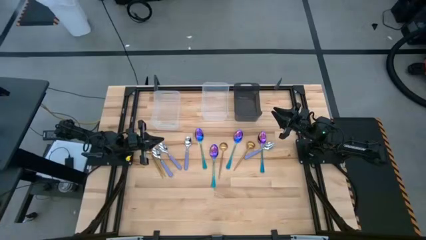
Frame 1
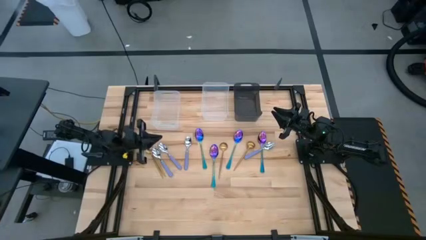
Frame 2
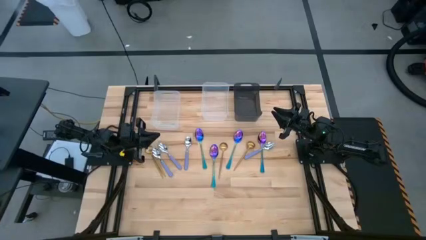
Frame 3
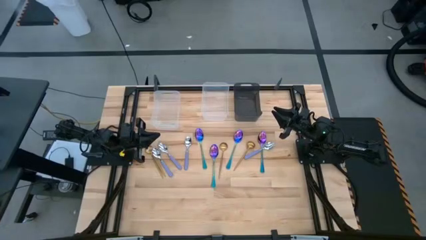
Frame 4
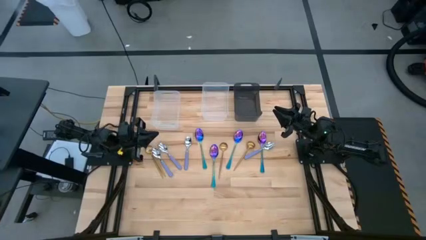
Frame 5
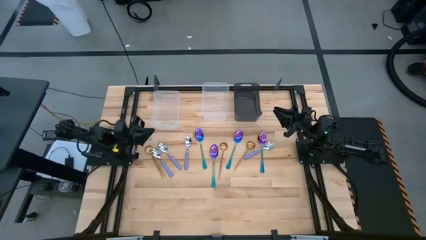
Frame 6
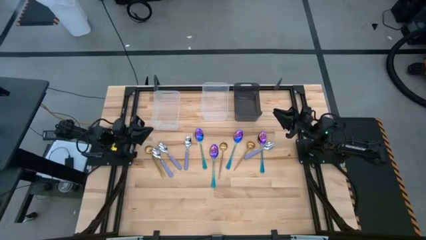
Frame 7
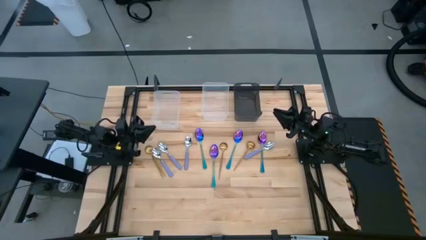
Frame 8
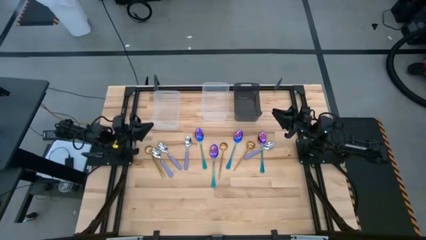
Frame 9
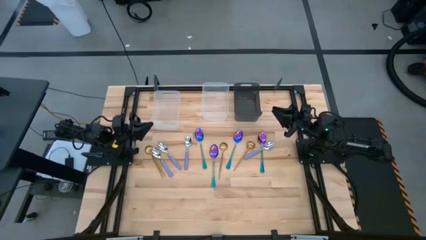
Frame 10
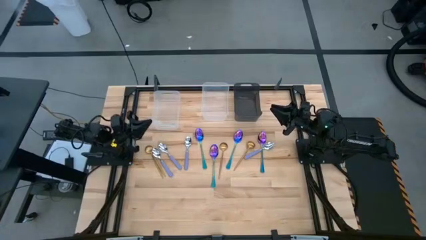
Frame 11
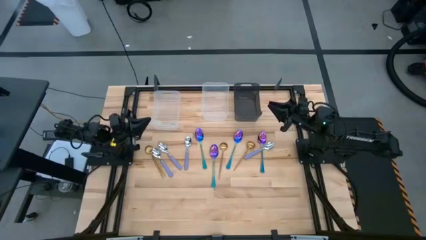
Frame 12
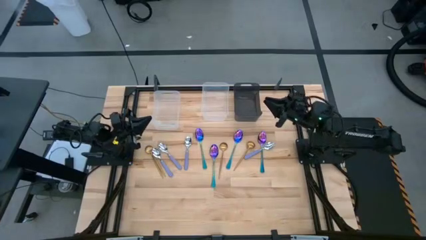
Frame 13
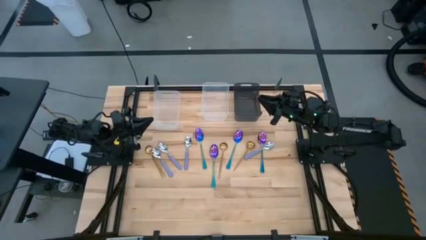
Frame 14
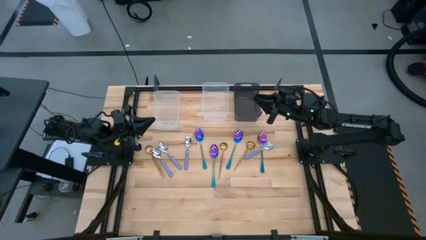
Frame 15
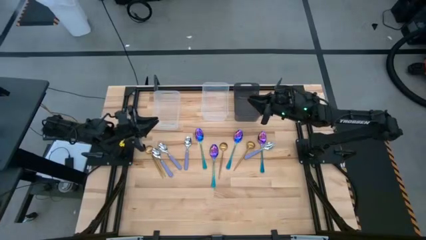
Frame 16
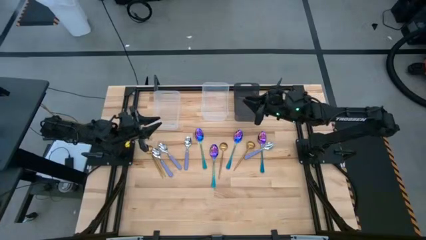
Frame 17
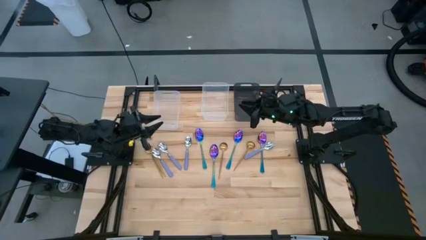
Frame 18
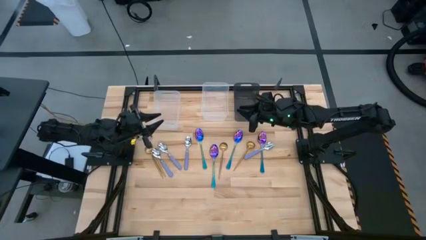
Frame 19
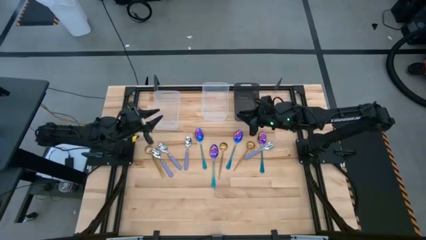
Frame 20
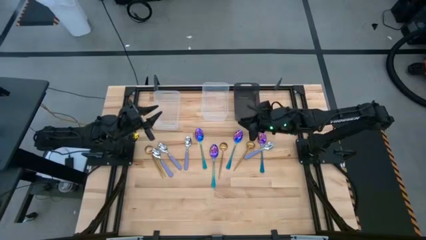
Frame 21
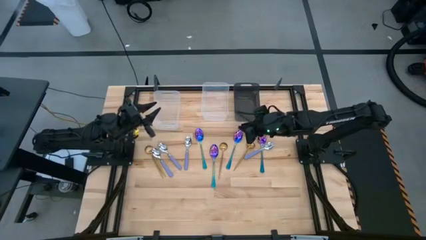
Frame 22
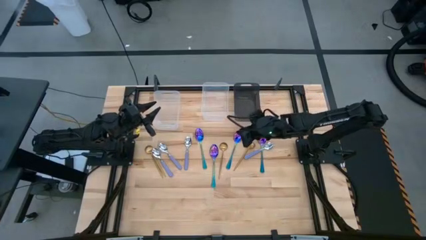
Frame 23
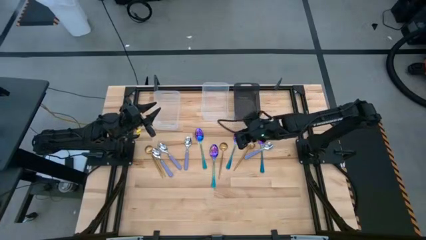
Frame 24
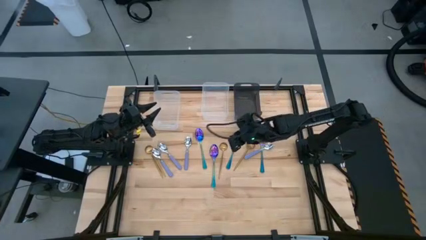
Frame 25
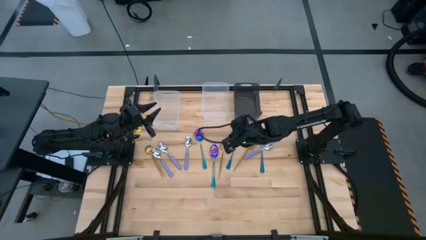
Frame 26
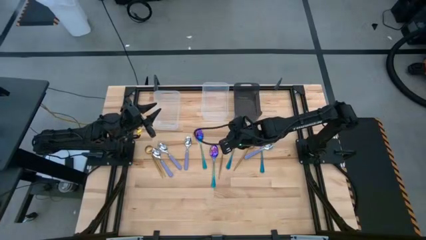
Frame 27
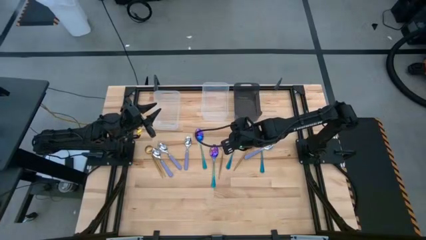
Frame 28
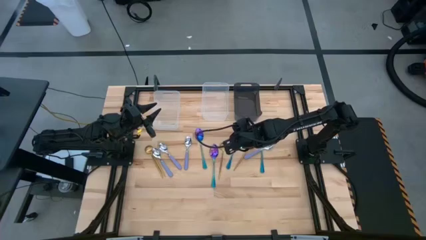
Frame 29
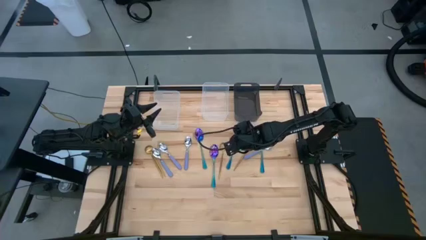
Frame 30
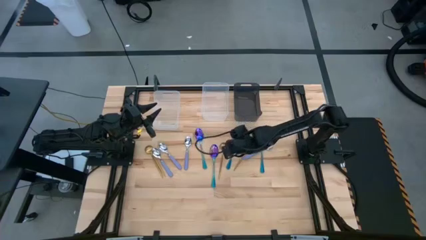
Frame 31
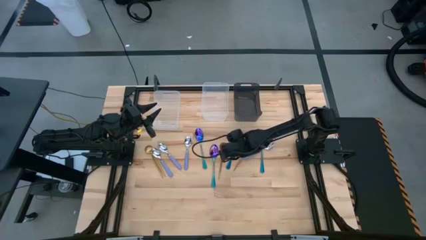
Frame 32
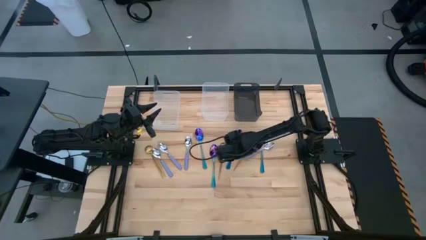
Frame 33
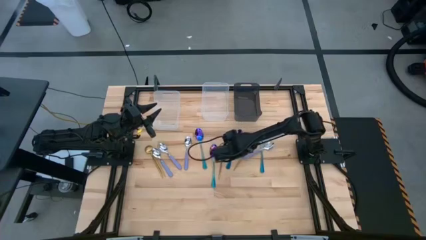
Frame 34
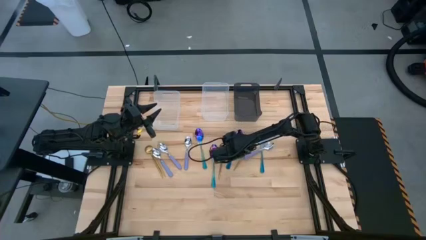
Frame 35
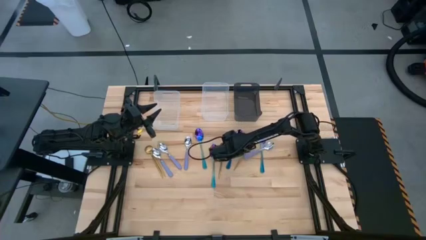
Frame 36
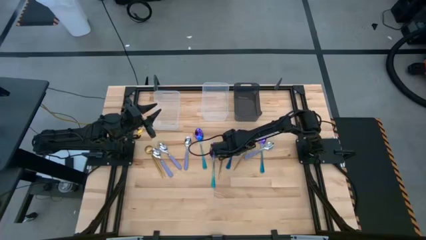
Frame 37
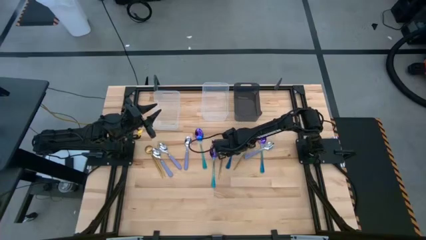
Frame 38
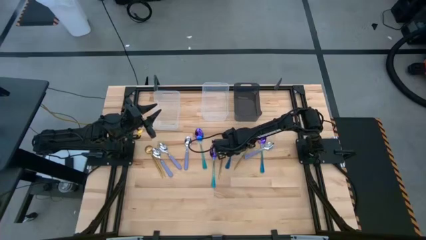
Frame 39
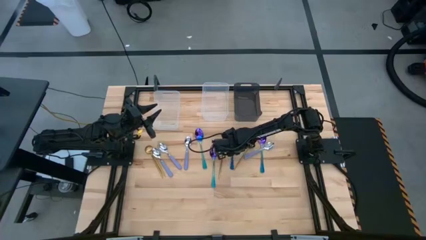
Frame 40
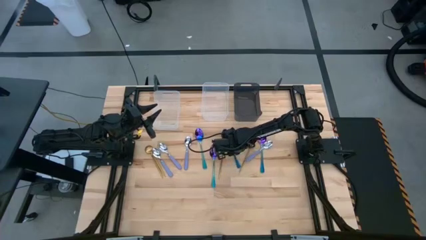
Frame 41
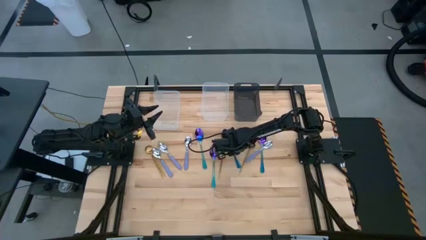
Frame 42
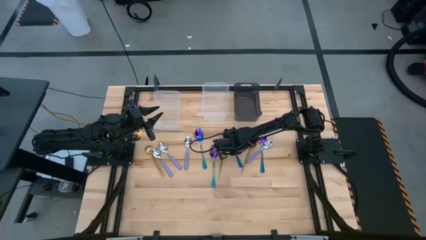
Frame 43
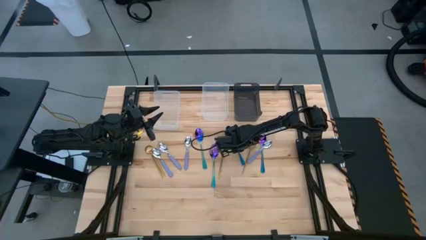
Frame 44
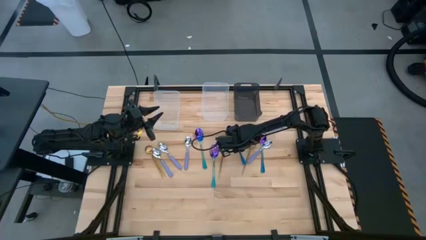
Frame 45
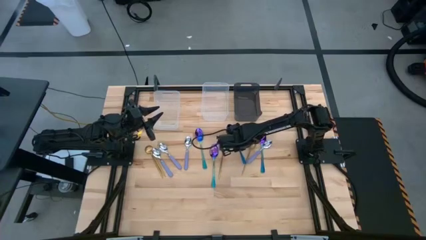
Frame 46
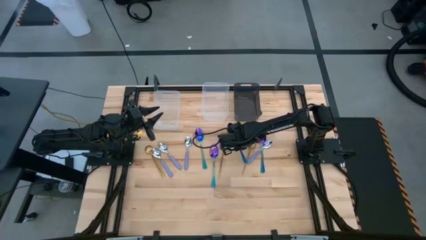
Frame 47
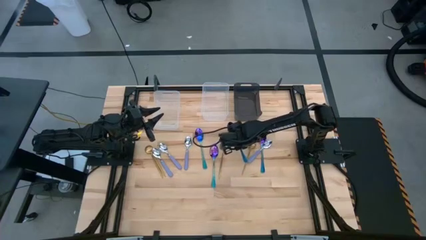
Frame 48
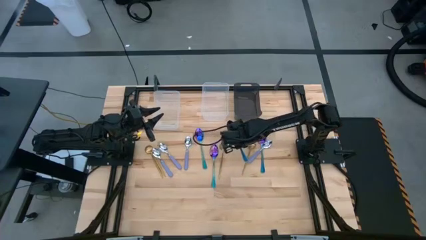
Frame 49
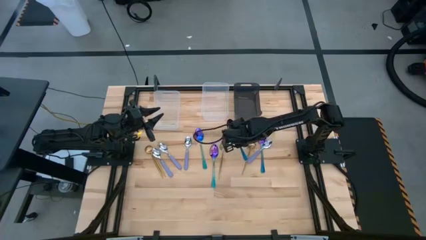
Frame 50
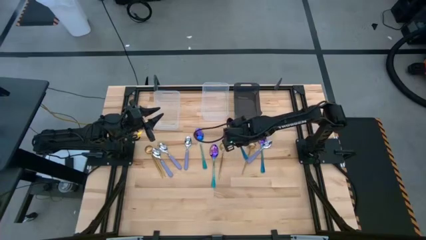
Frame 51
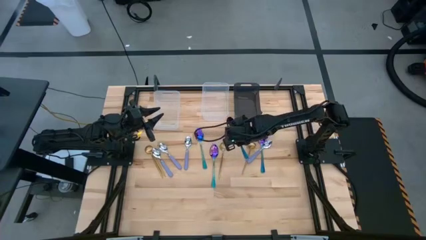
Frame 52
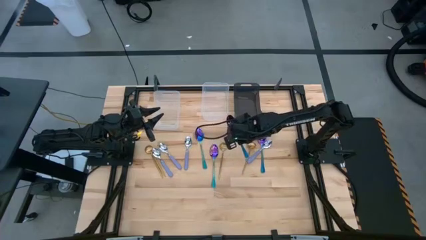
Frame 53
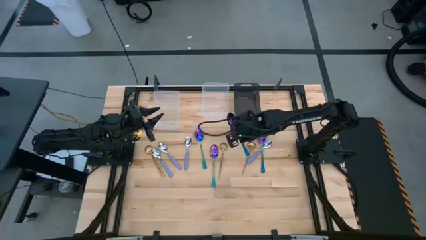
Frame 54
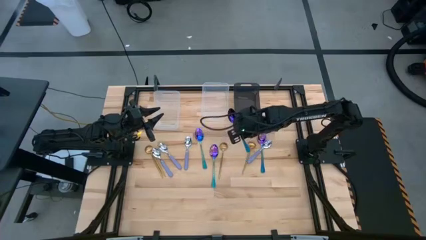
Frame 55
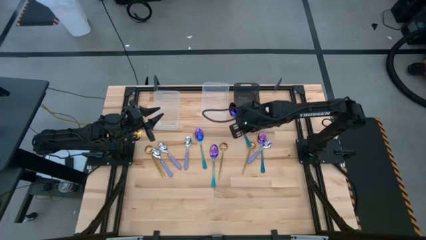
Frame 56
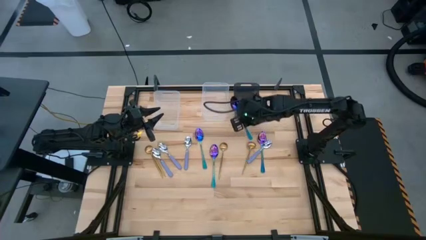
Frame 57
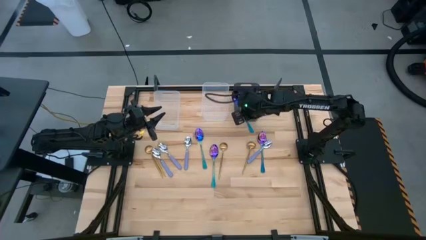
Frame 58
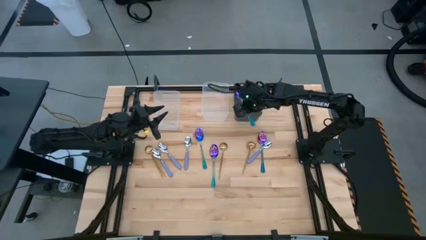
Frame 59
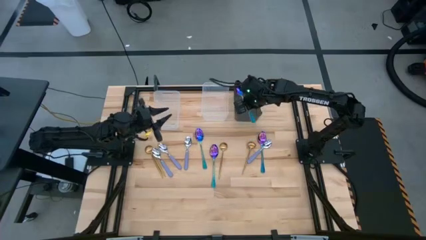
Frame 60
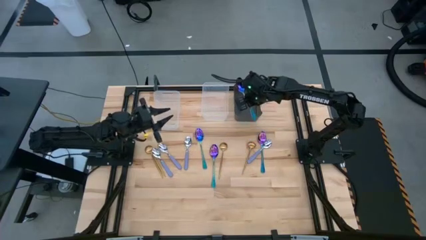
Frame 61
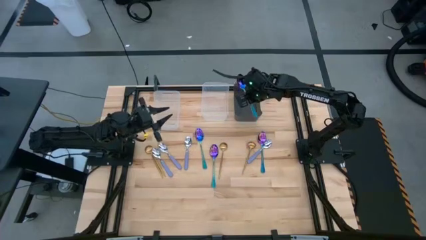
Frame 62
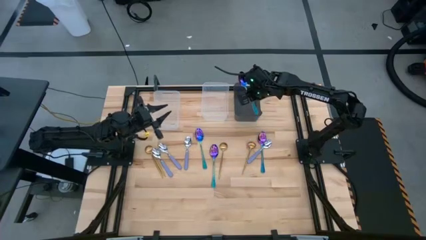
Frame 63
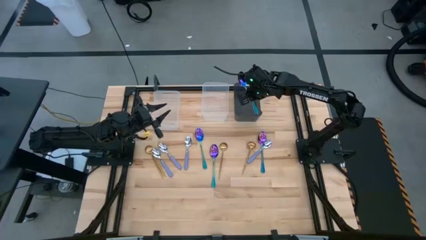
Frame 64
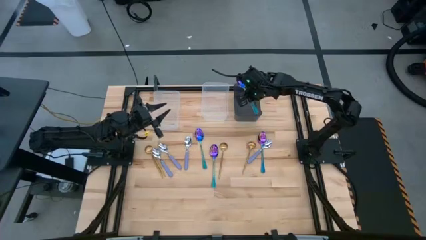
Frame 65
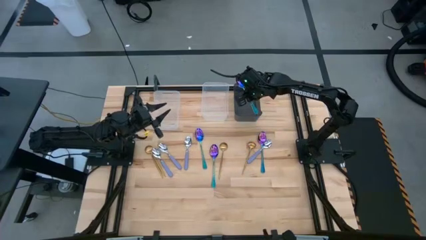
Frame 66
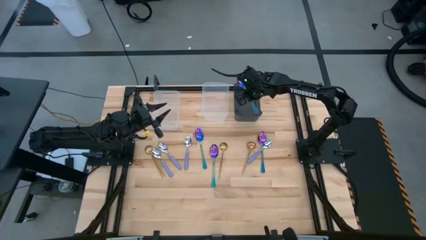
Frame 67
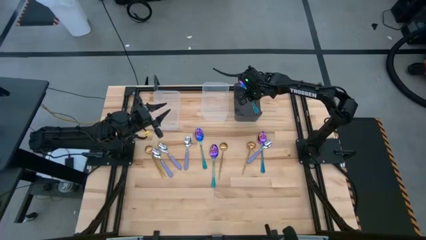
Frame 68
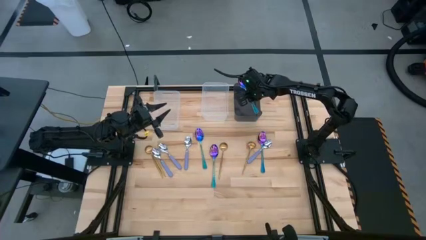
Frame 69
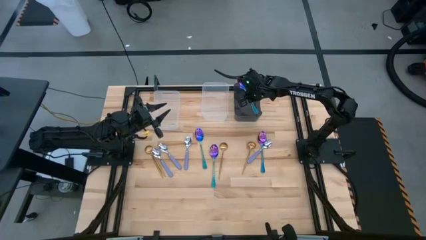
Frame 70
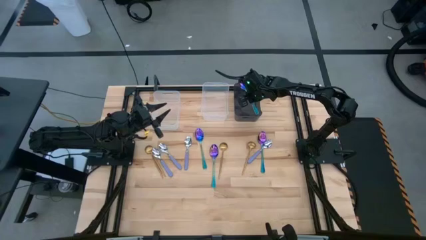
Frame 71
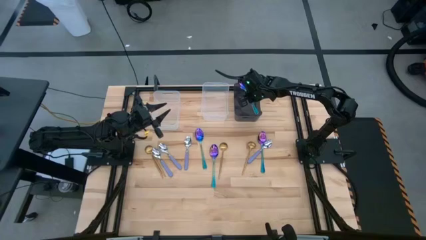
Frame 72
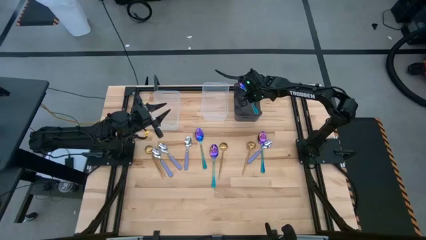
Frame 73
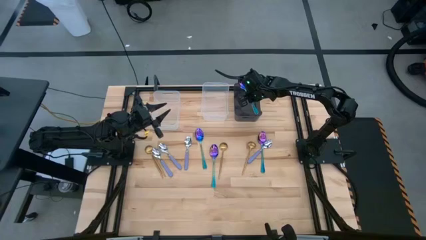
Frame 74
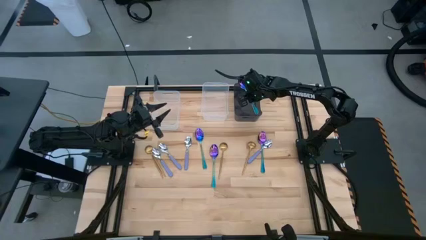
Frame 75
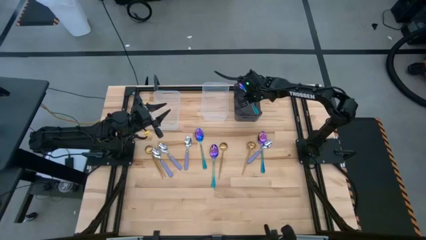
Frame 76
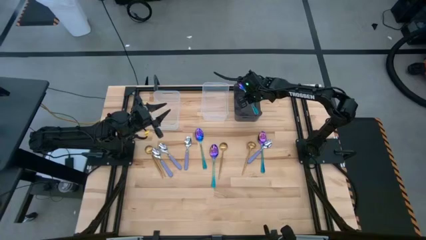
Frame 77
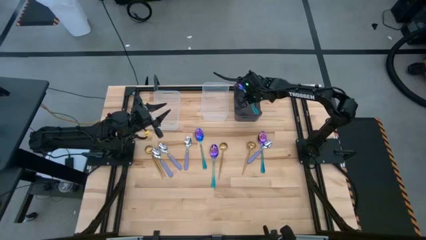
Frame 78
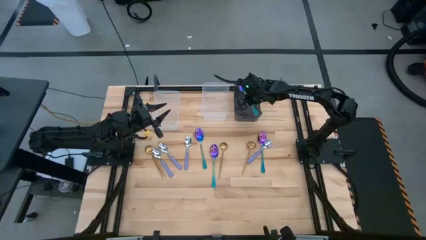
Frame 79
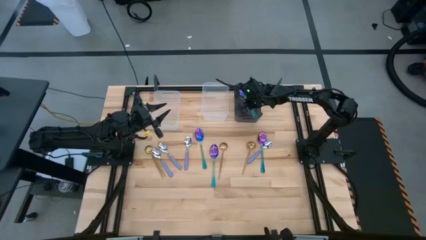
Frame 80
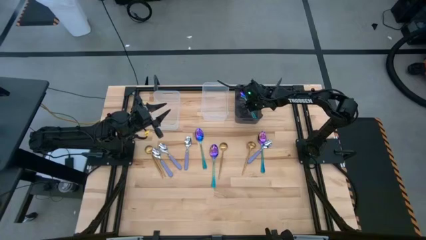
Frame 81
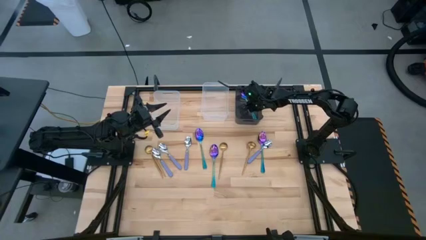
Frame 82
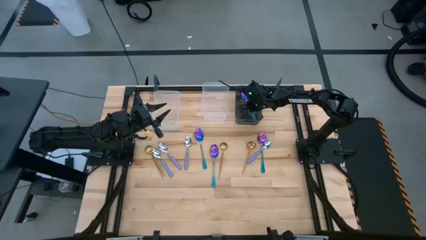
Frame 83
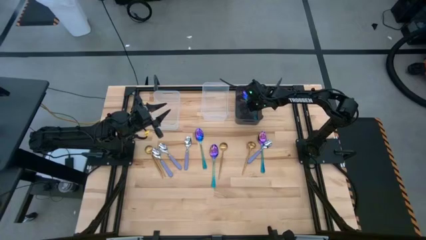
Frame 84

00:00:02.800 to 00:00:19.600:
Task: Sort silverware by color (type)
Put the blue spoon into the black bin
